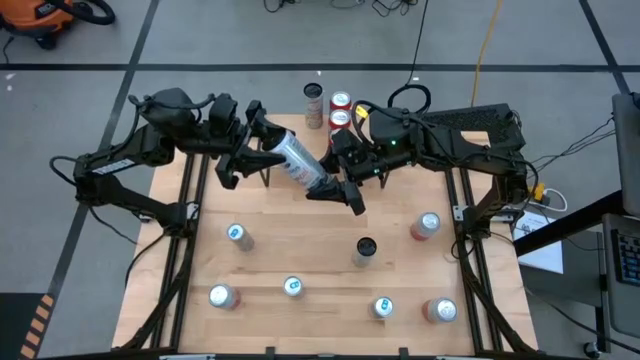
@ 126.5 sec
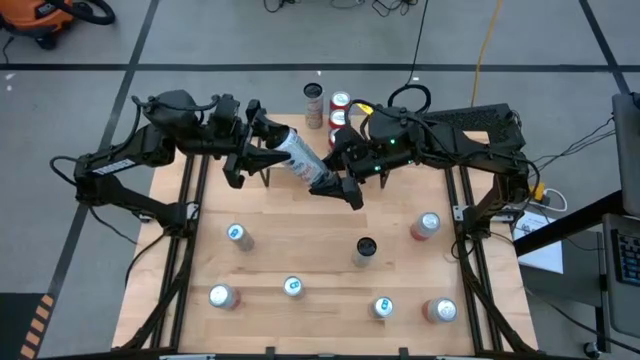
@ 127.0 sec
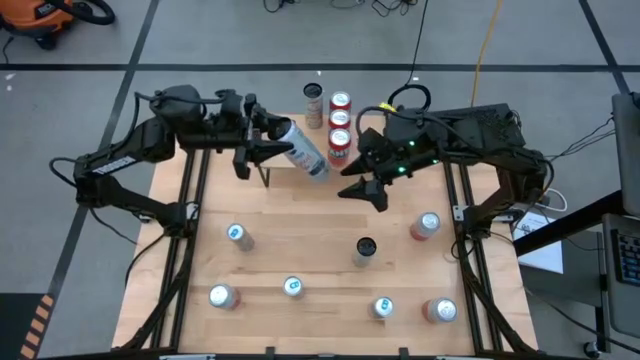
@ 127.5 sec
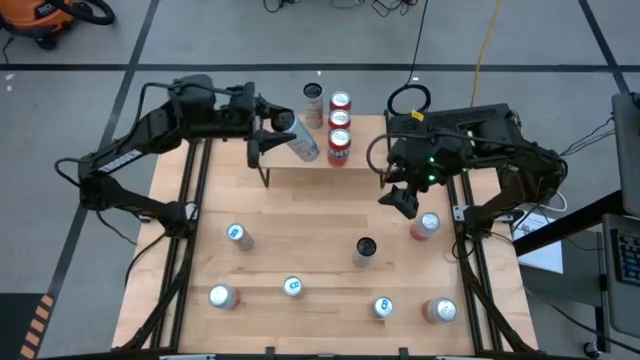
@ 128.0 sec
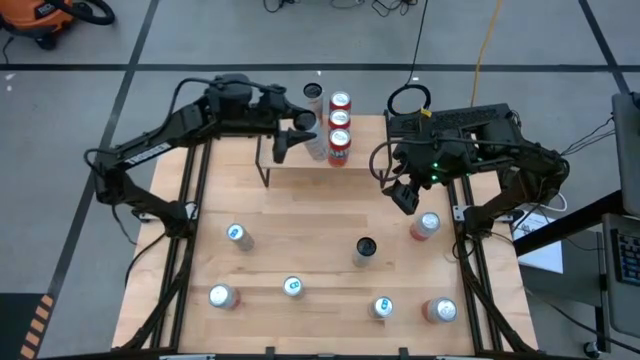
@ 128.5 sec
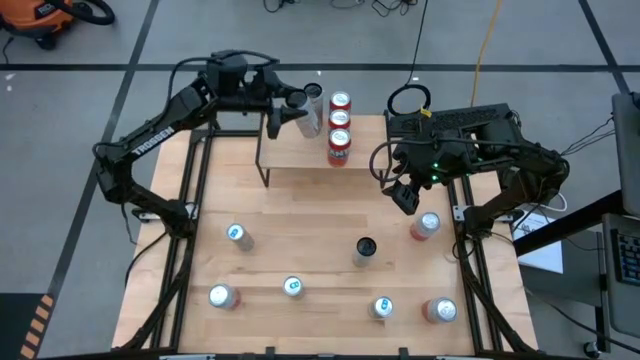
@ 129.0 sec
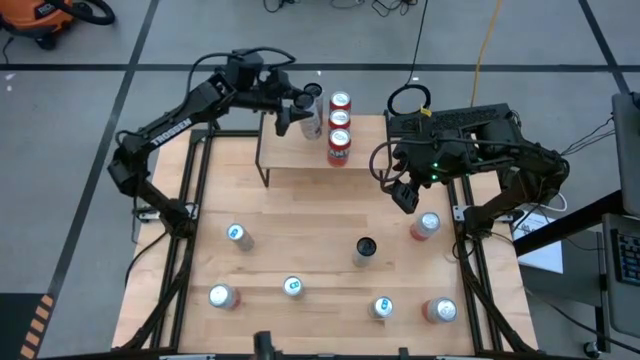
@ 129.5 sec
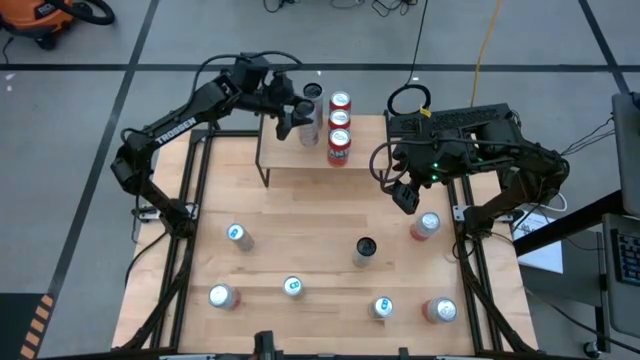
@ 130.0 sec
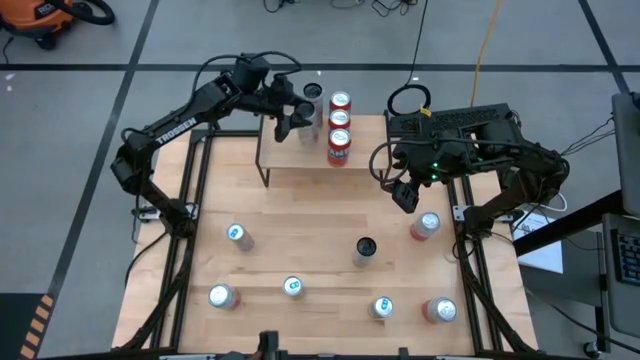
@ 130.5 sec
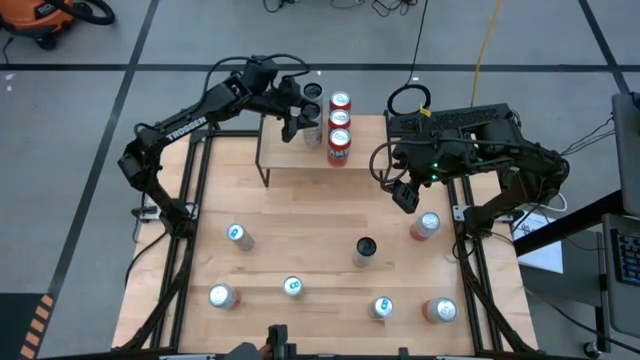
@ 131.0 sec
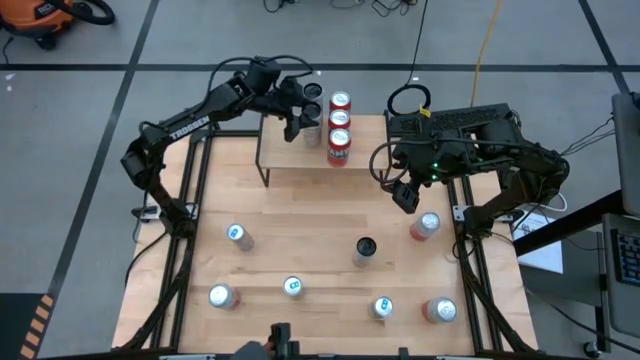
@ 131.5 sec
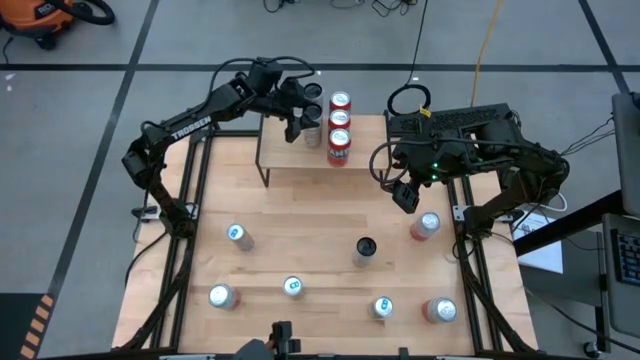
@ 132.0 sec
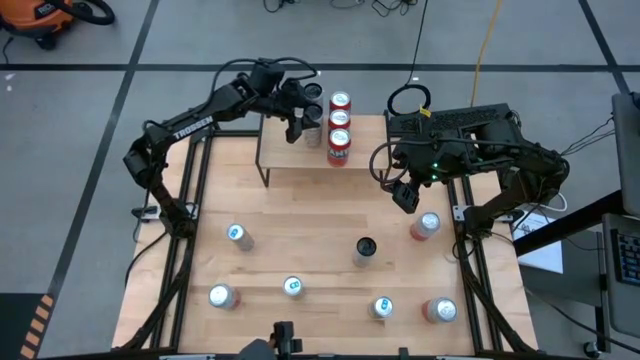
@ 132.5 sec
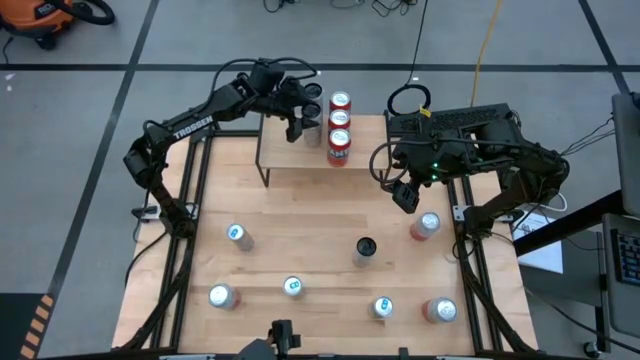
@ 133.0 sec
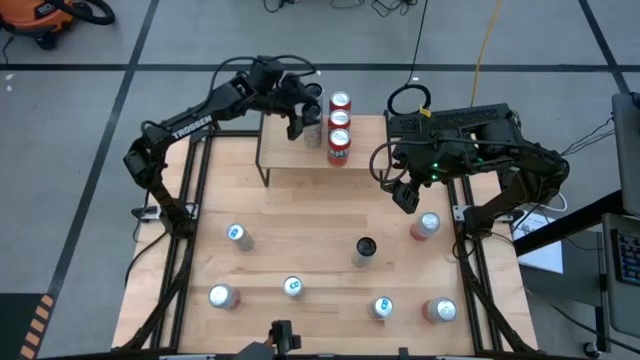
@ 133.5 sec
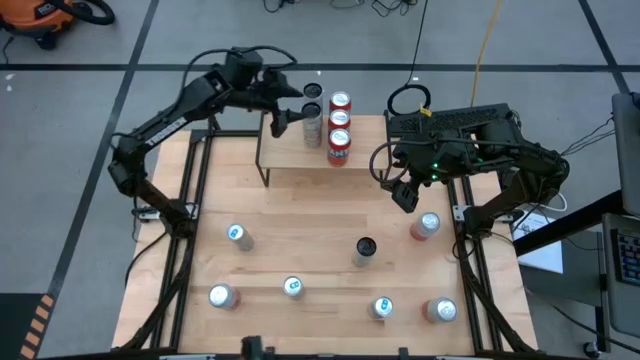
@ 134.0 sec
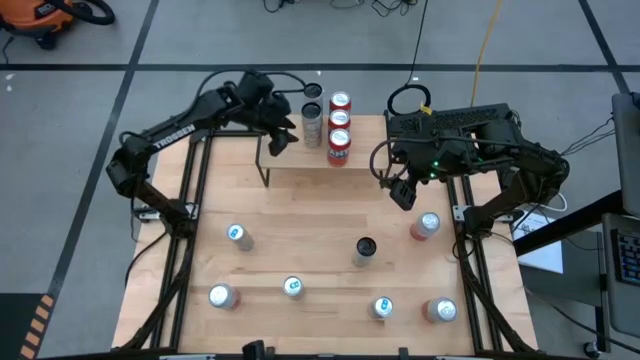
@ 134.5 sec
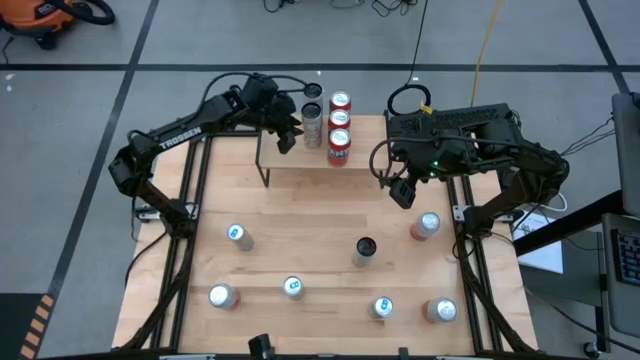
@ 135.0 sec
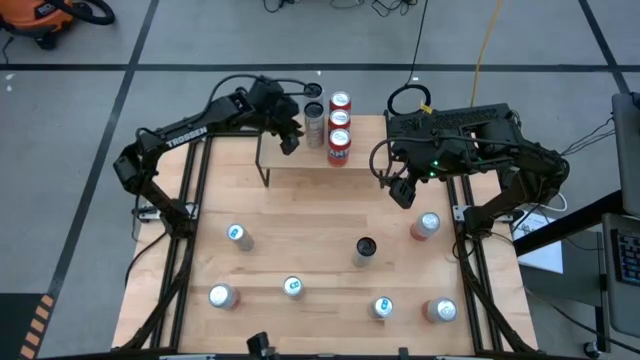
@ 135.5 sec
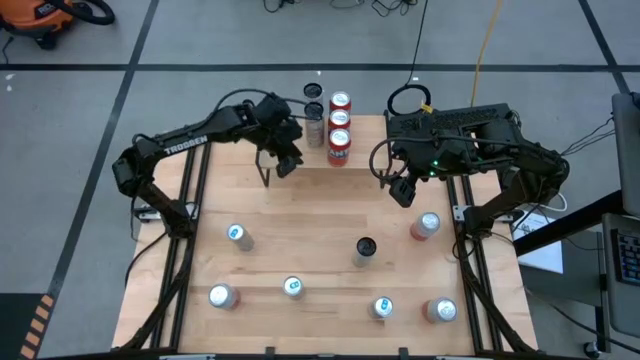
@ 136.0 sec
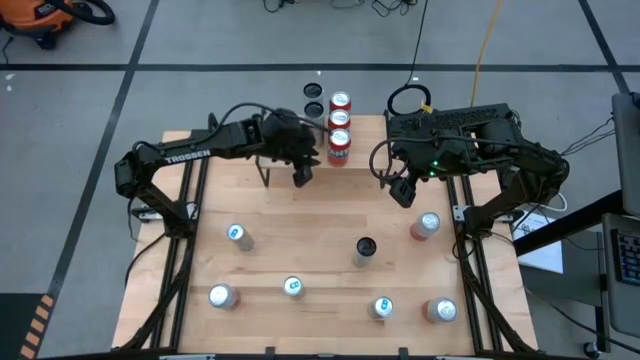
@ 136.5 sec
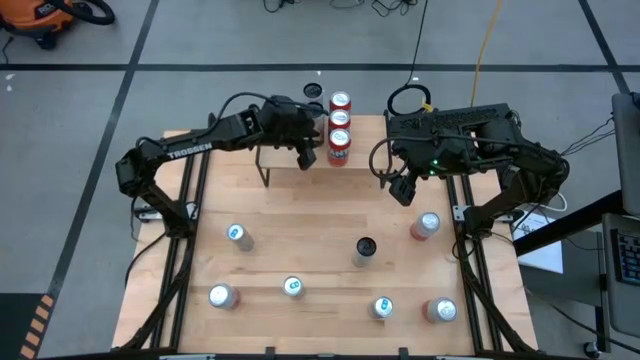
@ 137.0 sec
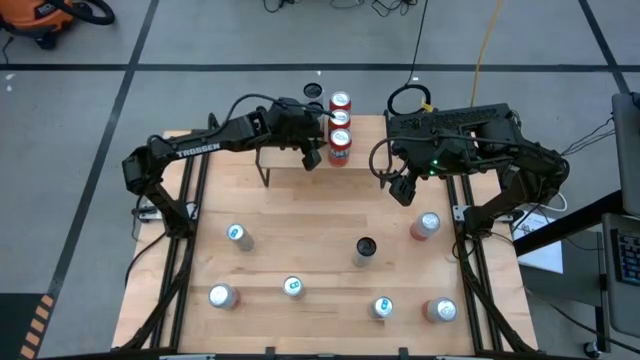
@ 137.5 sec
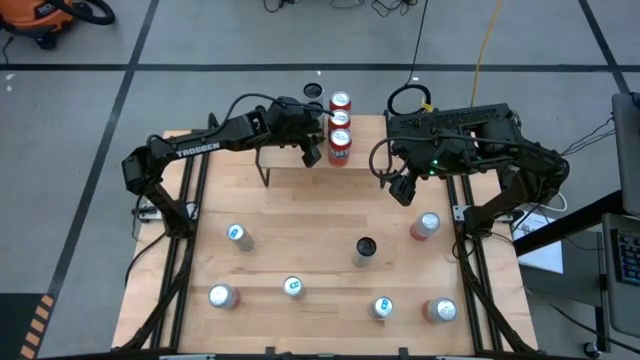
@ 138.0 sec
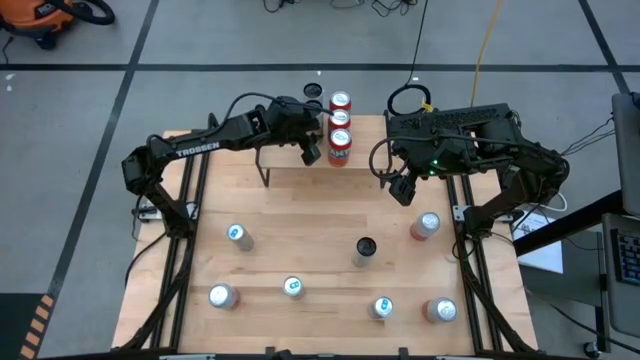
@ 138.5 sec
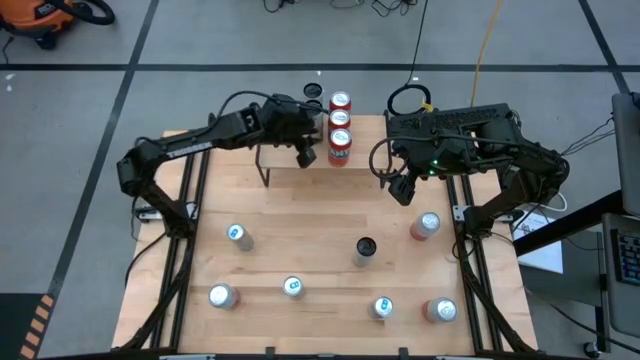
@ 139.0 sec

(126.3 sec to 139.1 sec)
Task: Place canned beverage on shelf
Put the left white and yellow soda can aligned with the other white and yellow soda can on the shelf
